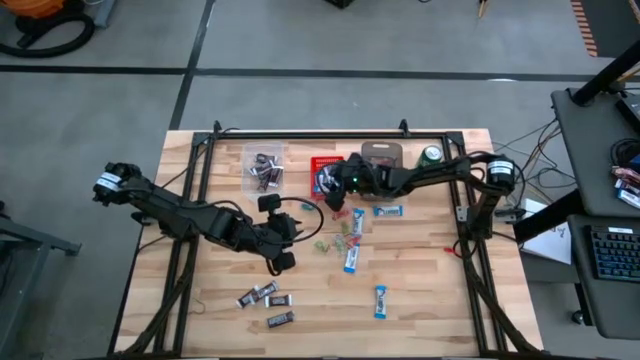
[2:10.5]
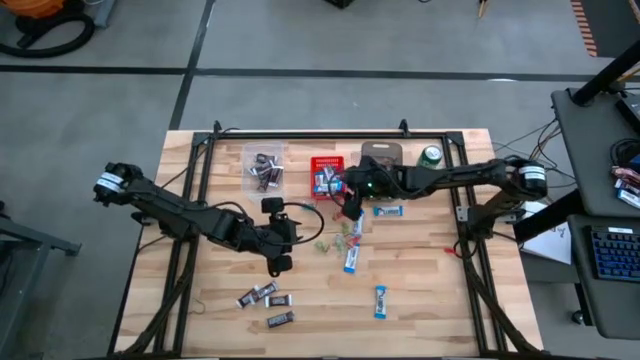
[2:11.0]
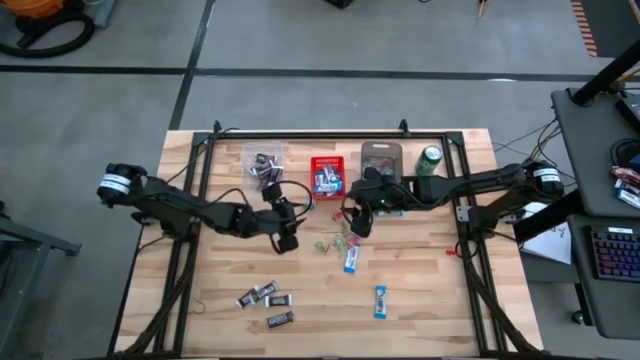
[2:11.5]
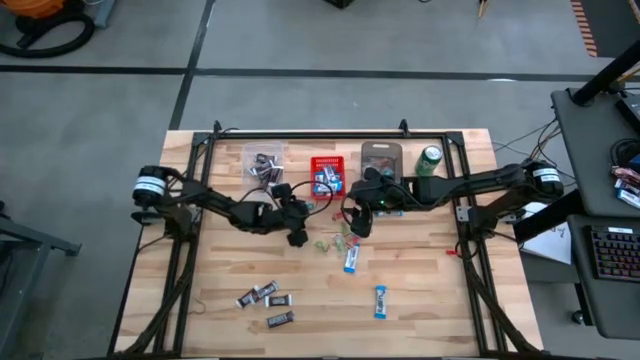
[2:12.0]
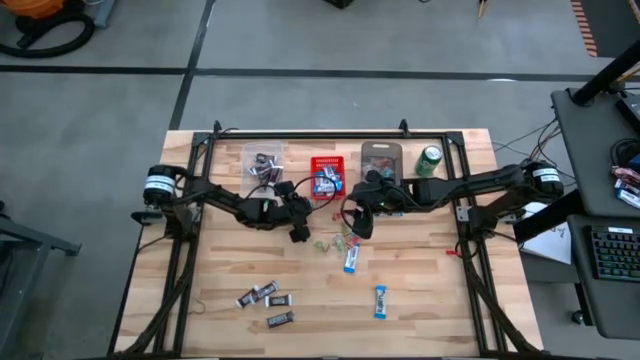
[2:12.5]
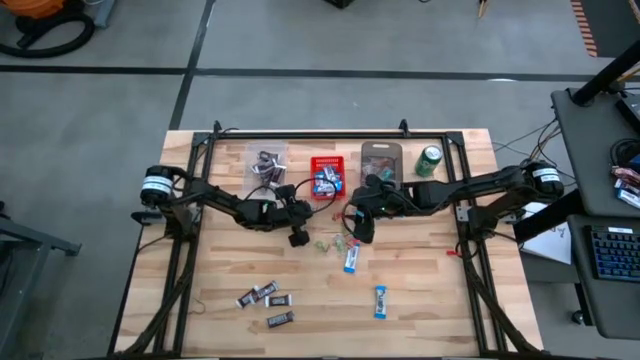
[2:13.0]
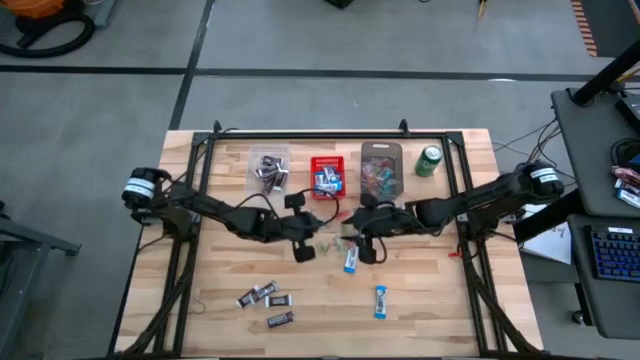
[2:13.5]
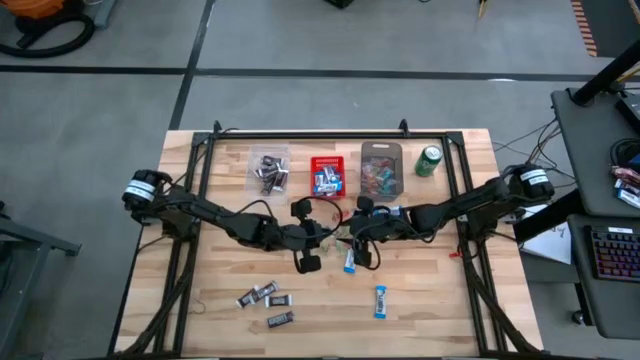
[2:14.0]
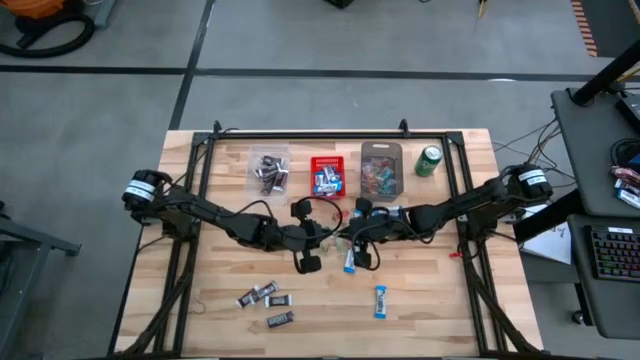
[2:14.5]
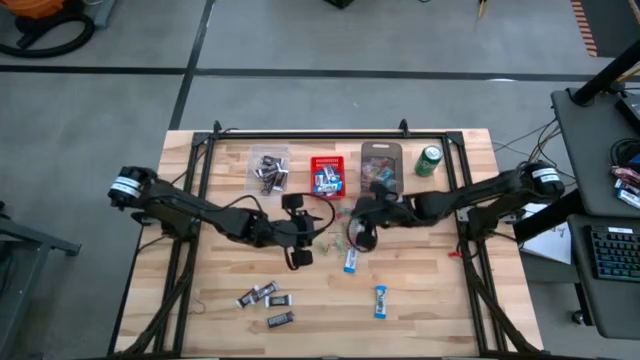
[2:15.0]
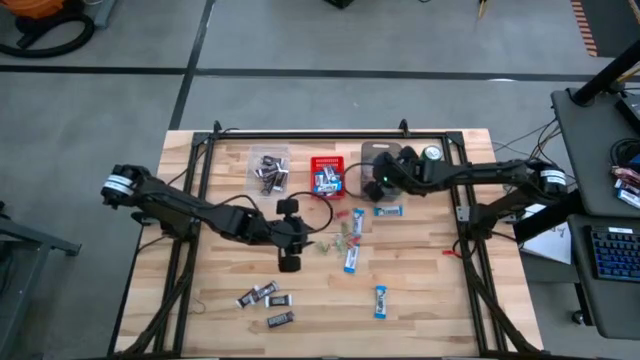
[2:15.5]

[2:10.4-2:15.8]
Task: Sort candy
Put the blue gummy candy into the black bin

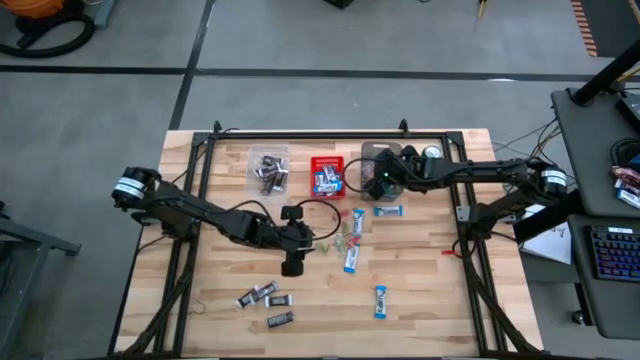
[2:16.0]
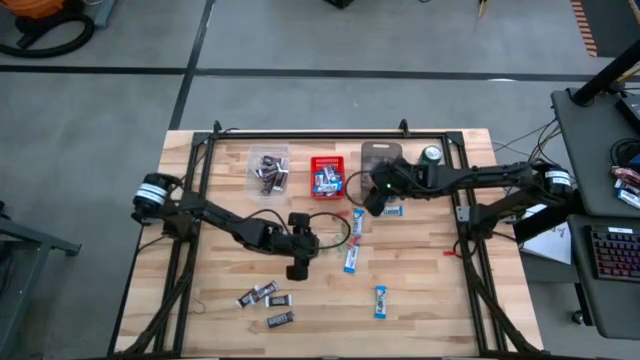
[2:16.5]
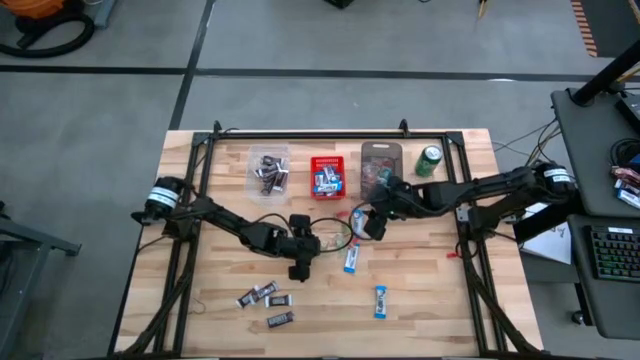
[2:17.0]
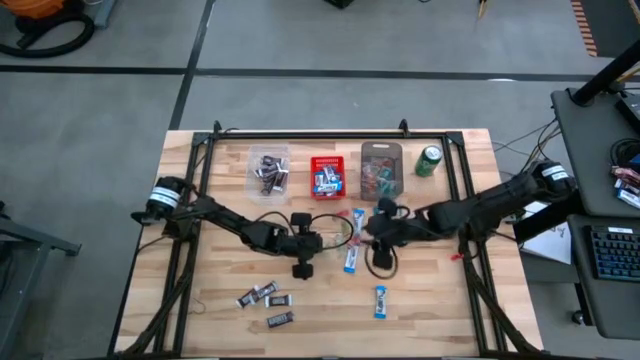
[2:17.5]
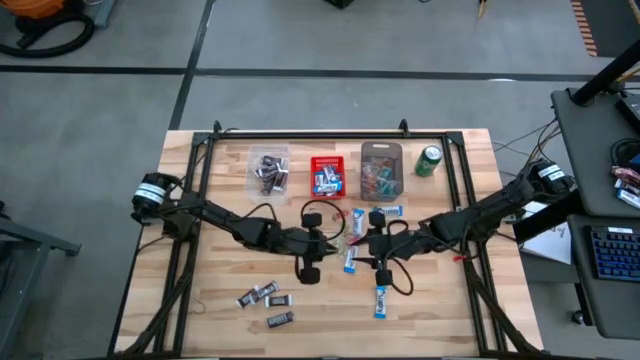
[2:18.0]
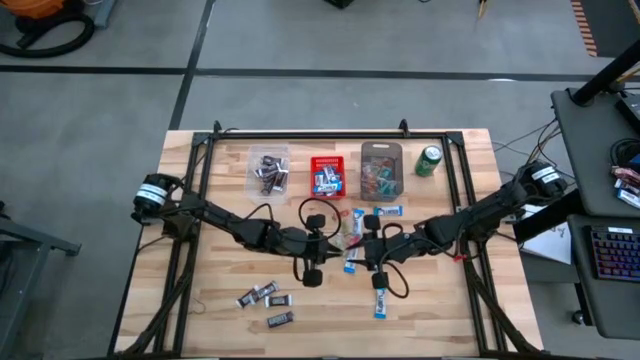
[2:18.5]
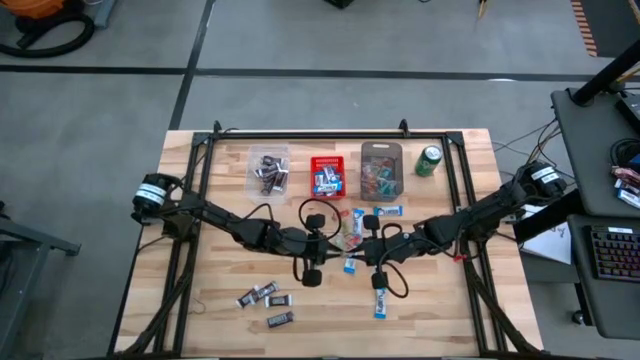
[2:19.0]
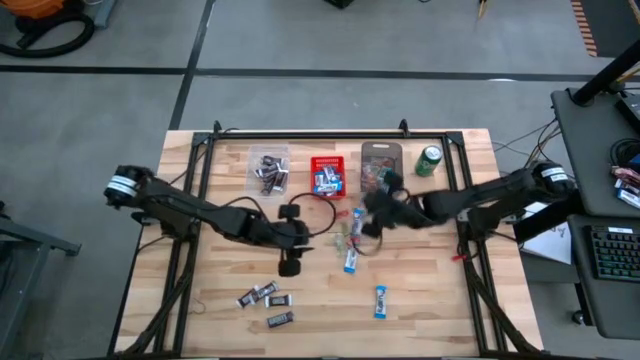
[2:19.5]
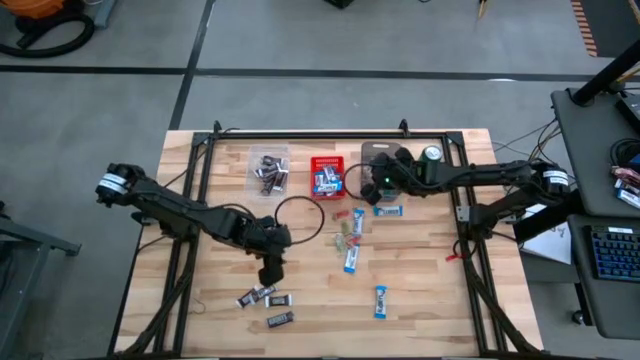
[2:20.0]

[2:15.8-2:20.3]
Put the green gummy candy into the black bin

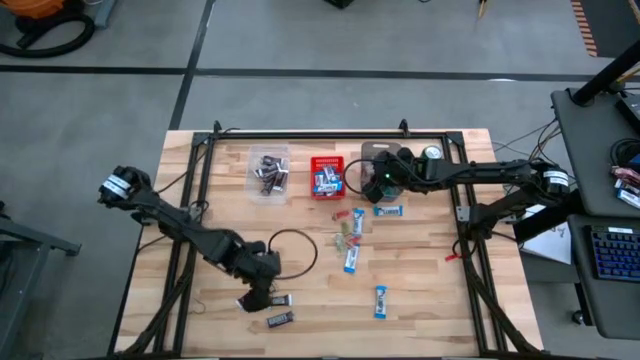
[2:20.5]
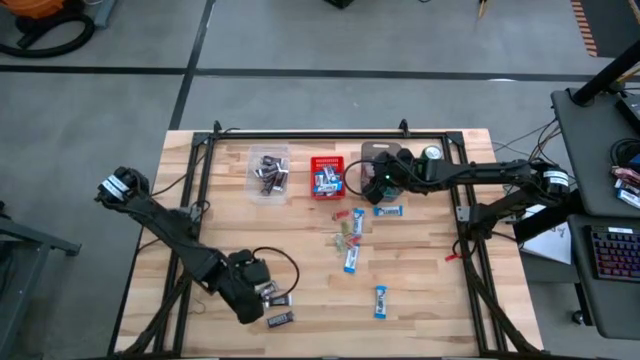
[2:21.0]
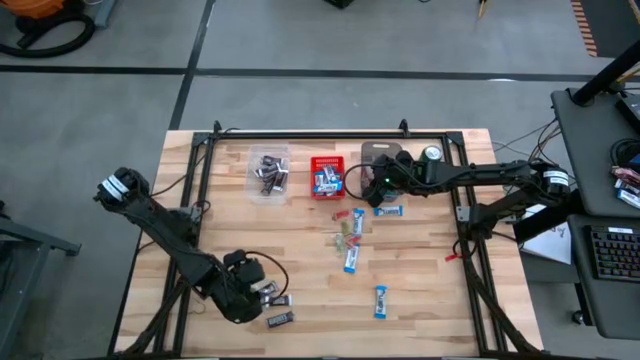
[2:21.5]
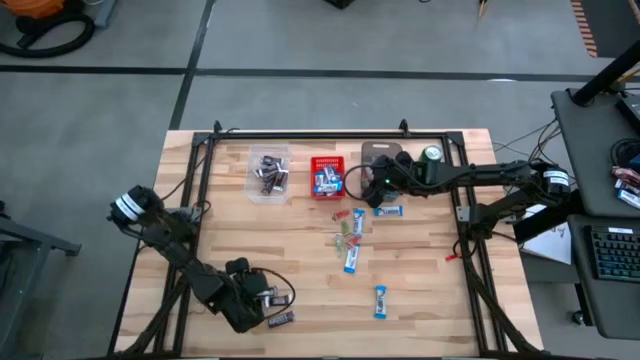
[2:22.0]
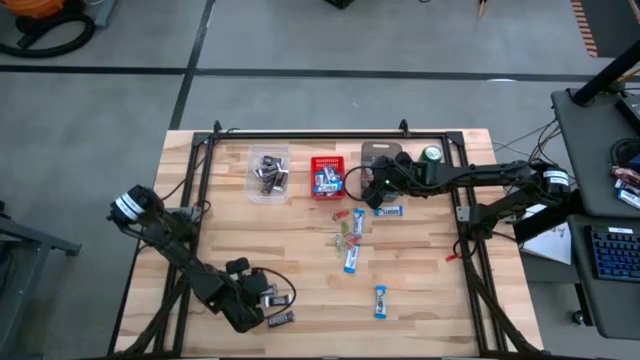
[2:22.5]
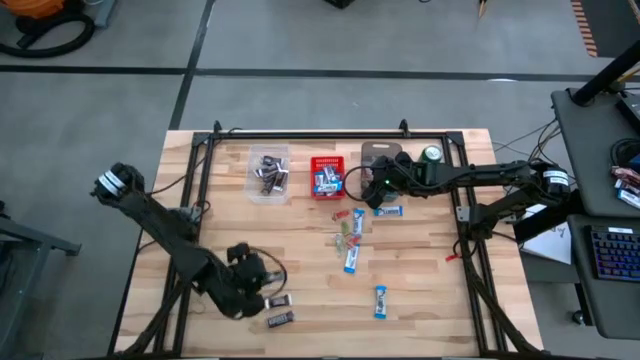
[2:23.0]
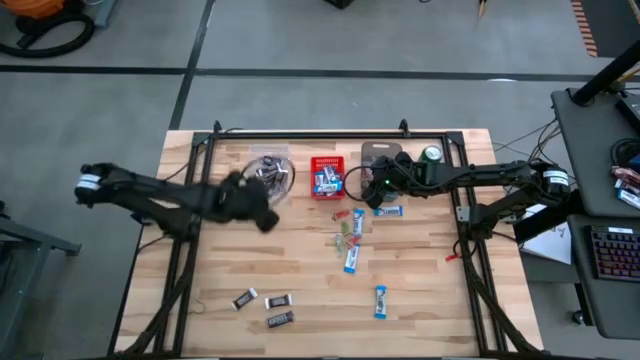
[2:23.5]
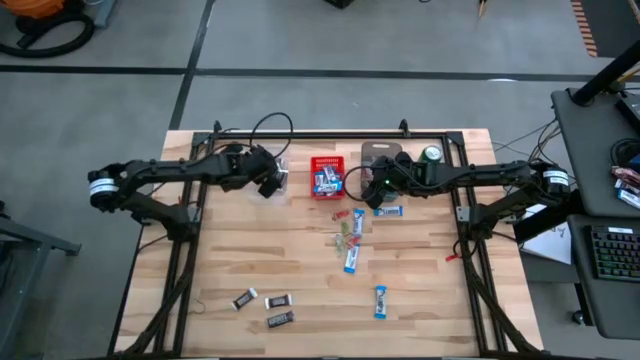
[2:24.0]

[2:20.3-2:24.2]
Put the brown chocolate bar into the transparent bin

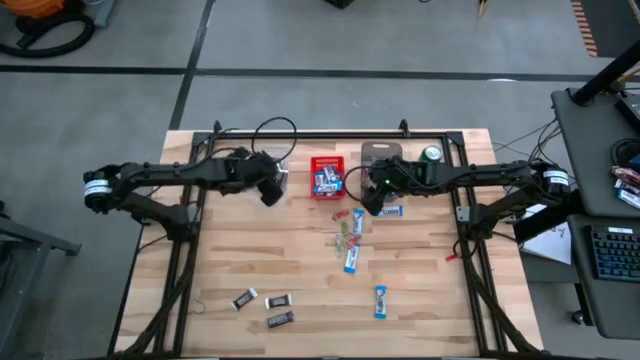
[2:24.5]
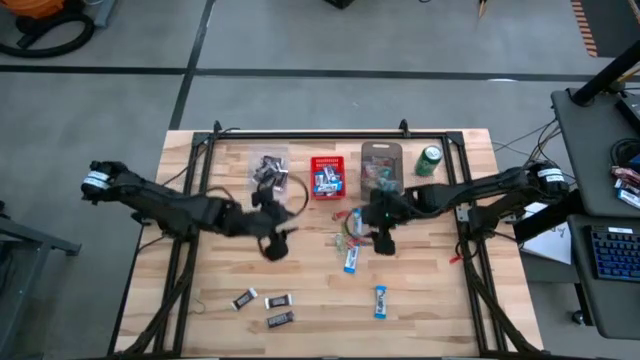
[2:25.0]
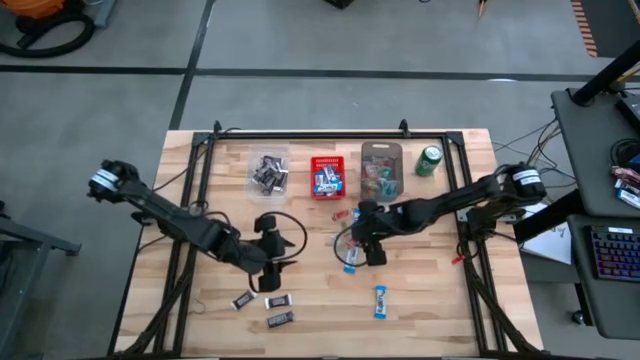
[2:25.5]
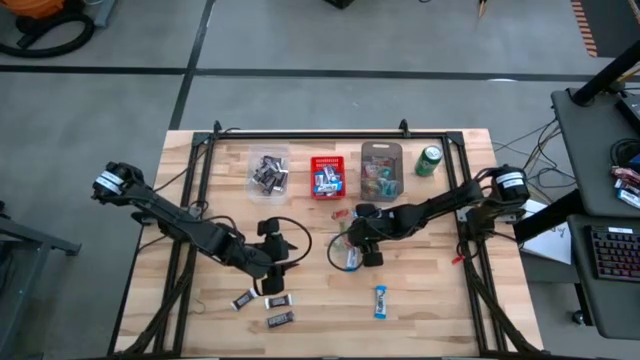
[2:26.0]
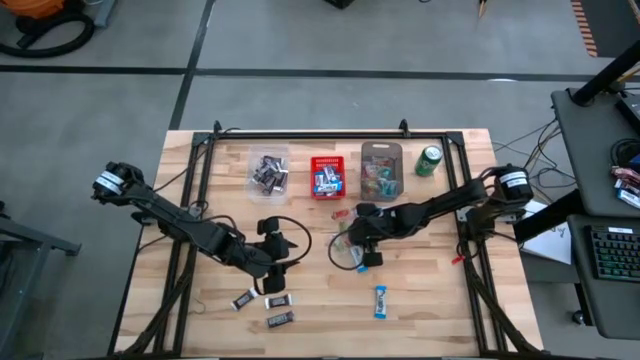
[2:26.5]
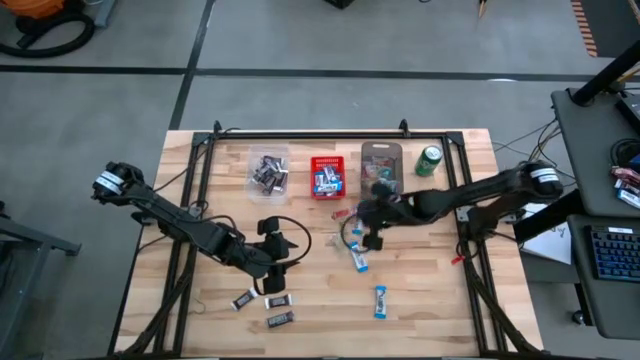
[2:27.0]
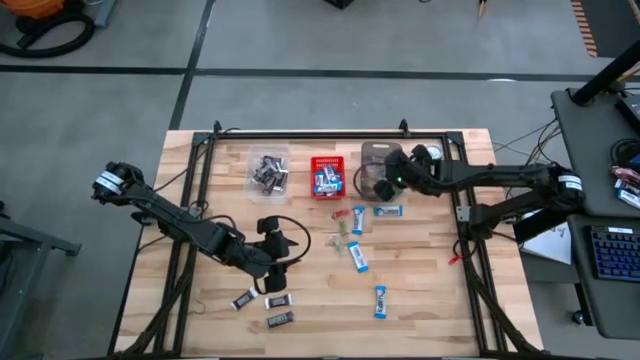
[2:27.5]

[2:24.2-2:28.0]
Put the red gummy candy into the black bin

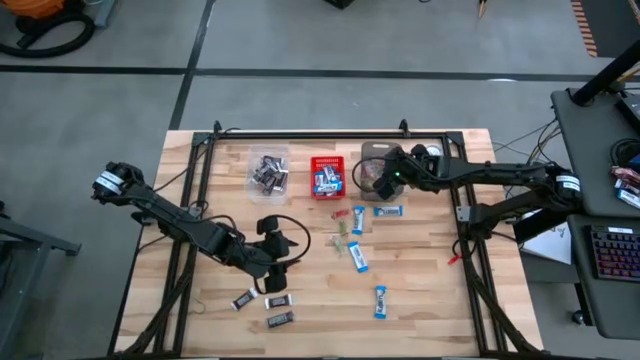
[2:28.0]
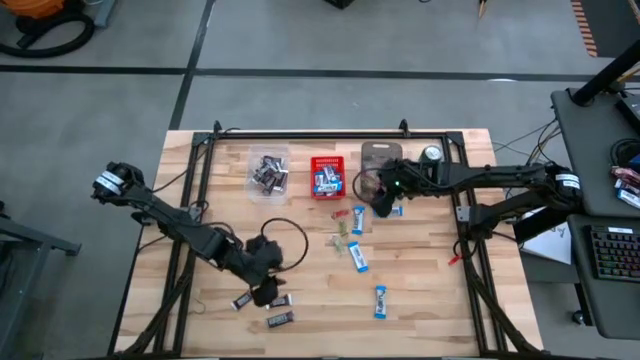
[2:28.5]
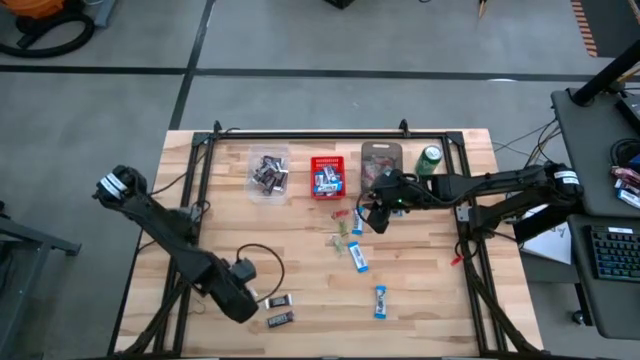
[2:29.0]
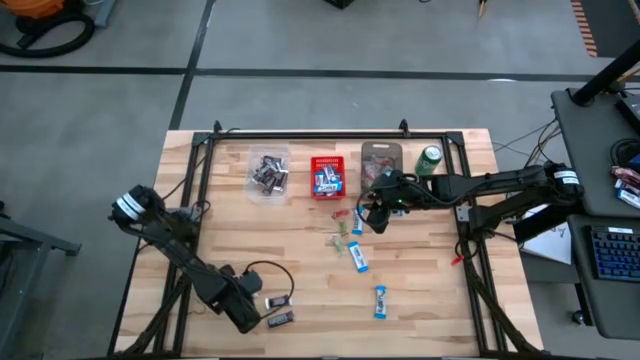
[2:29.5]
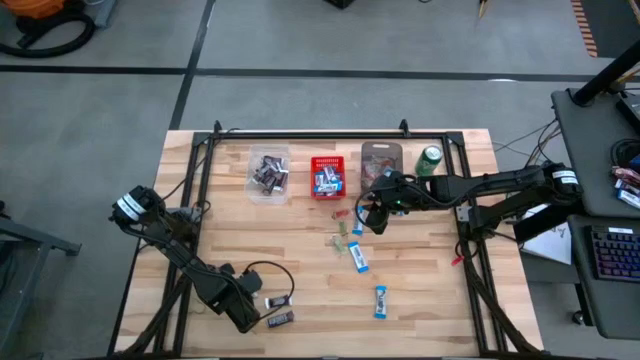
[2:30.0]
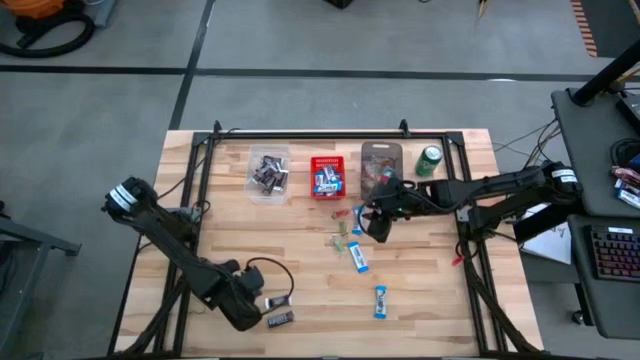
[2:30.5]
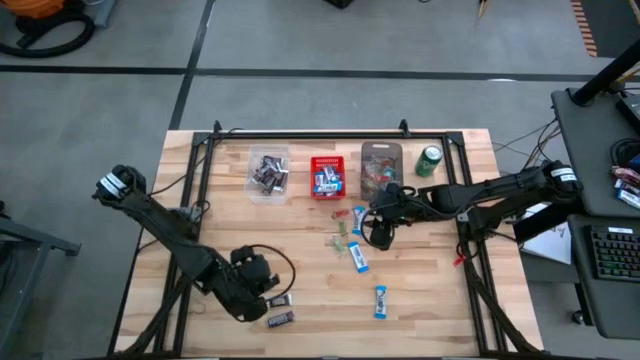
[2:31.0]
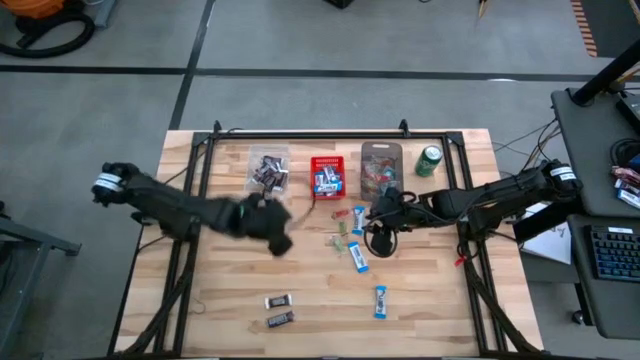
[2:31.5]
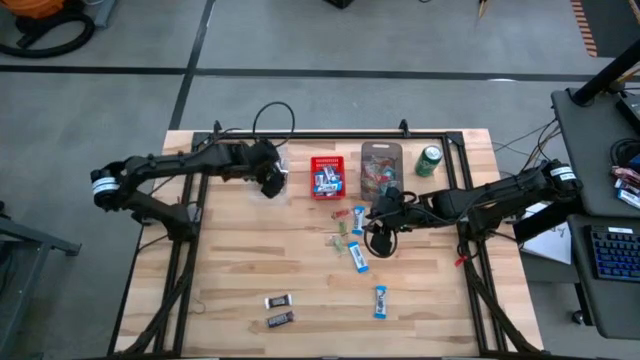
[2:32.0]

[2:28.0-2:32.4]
Put the brown chocolate bar into the transparent bin
